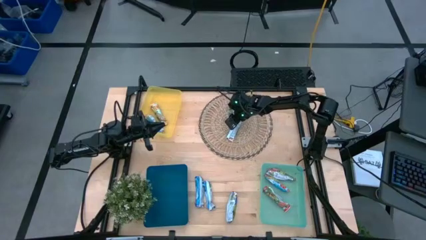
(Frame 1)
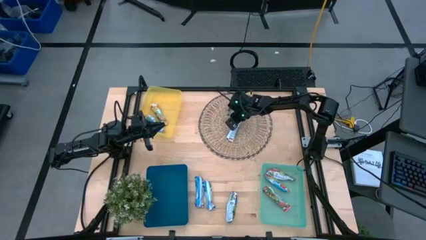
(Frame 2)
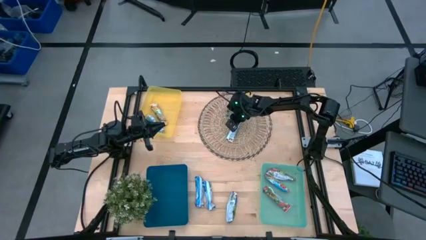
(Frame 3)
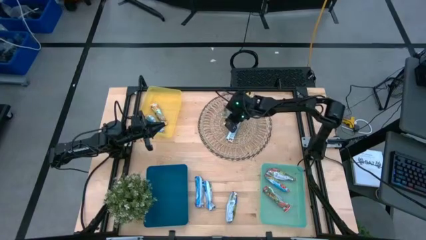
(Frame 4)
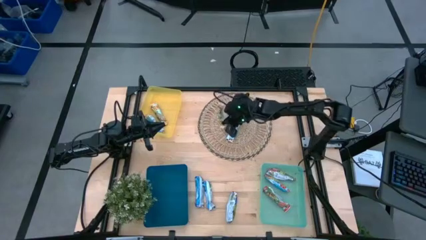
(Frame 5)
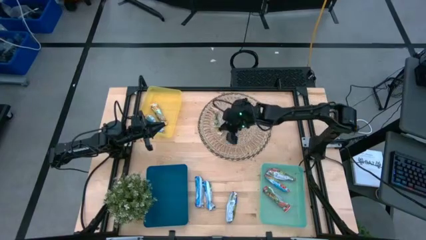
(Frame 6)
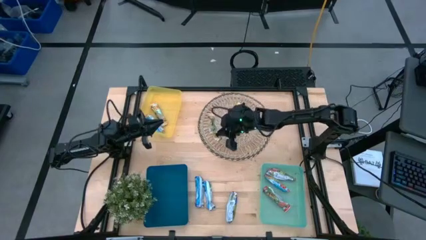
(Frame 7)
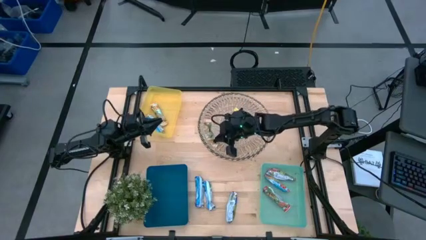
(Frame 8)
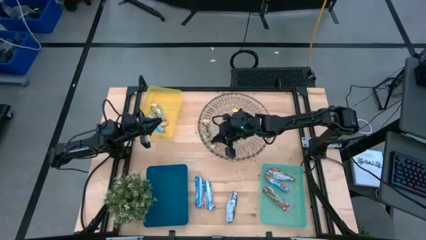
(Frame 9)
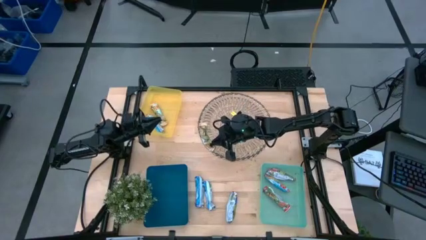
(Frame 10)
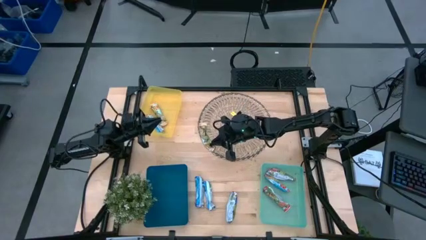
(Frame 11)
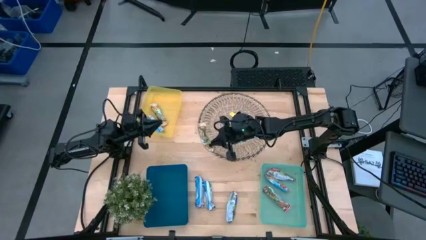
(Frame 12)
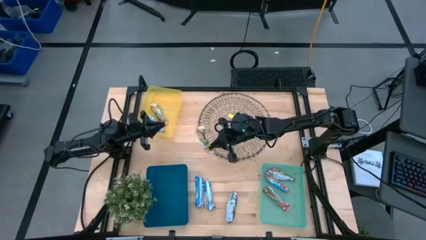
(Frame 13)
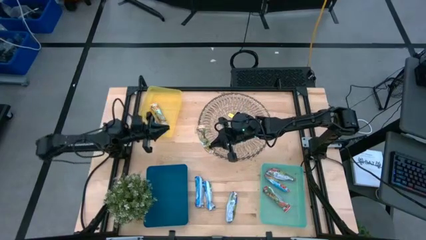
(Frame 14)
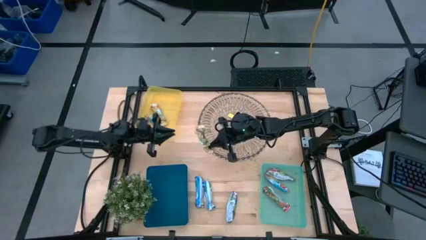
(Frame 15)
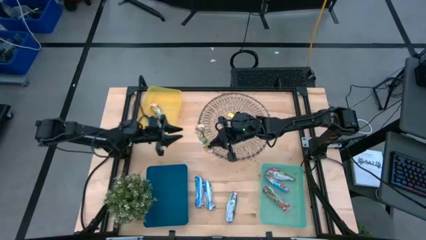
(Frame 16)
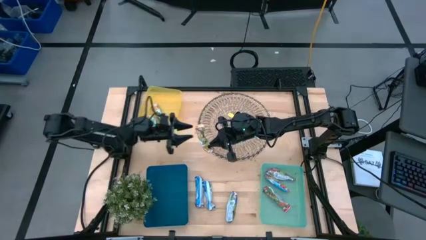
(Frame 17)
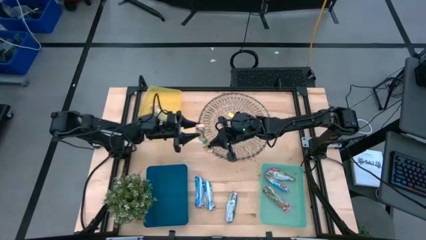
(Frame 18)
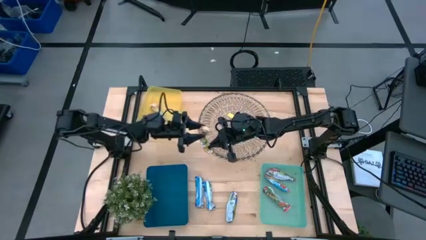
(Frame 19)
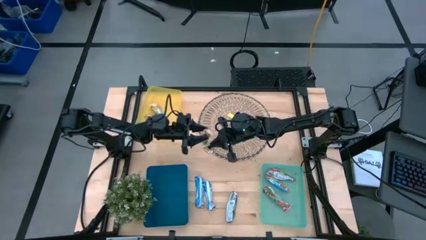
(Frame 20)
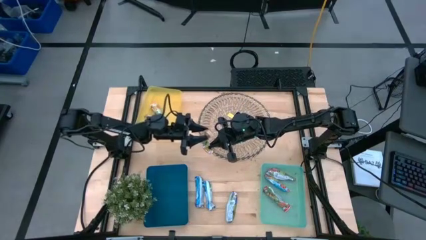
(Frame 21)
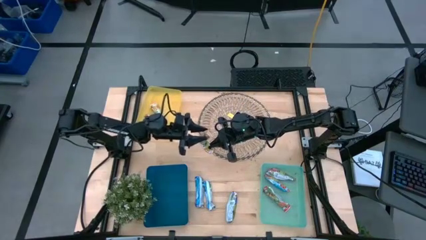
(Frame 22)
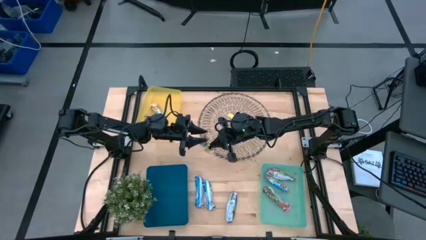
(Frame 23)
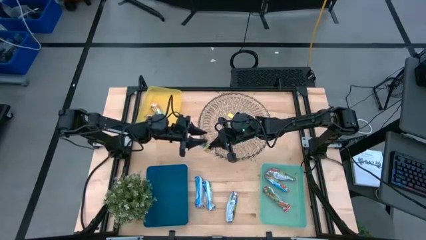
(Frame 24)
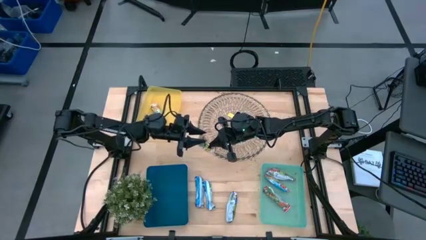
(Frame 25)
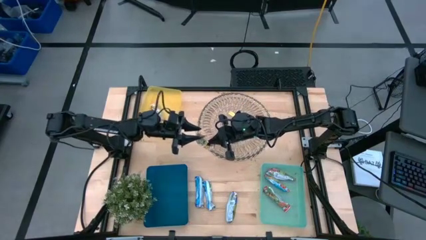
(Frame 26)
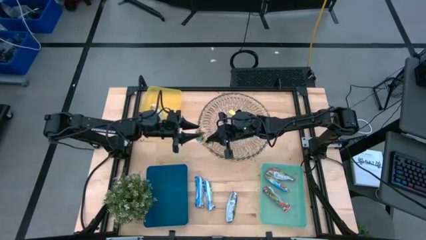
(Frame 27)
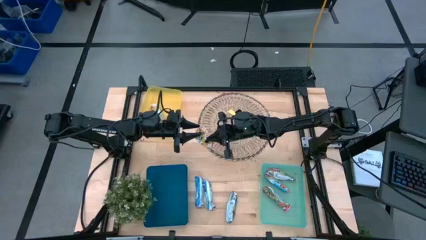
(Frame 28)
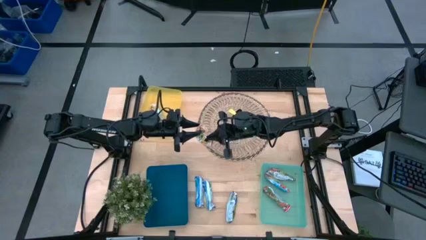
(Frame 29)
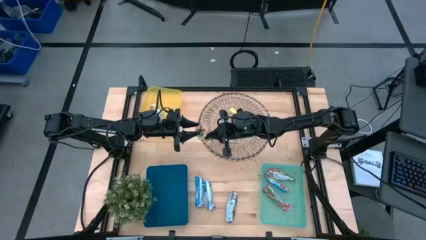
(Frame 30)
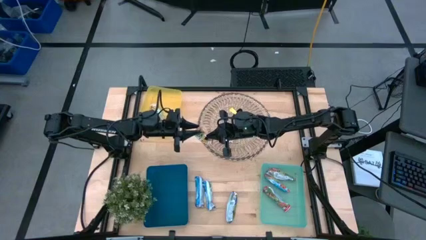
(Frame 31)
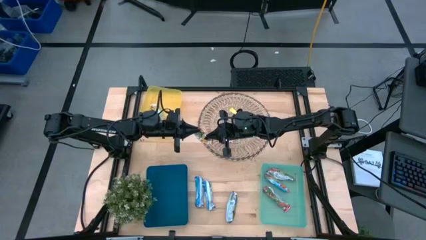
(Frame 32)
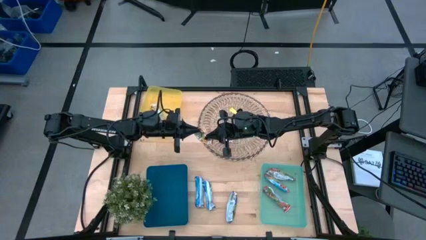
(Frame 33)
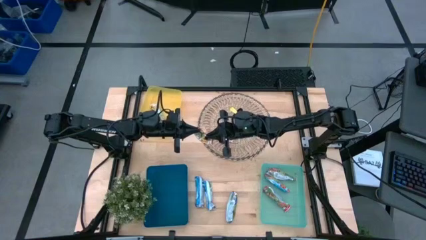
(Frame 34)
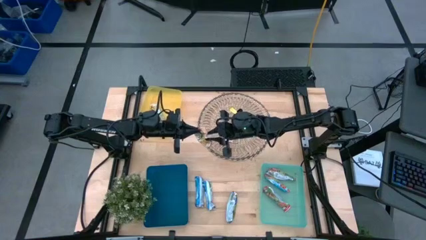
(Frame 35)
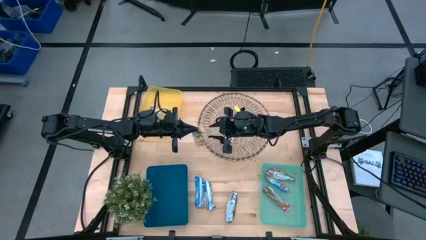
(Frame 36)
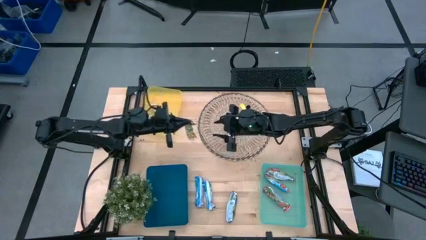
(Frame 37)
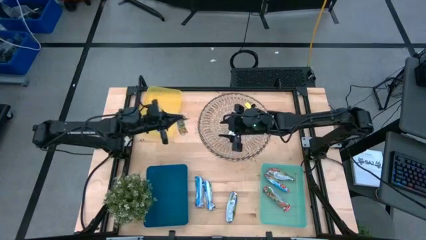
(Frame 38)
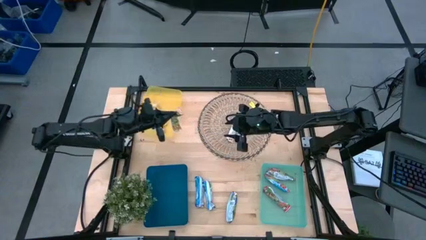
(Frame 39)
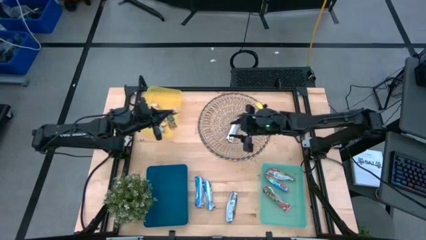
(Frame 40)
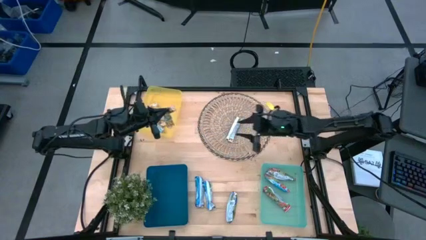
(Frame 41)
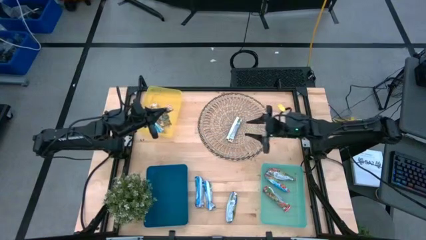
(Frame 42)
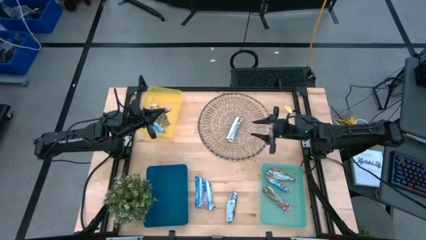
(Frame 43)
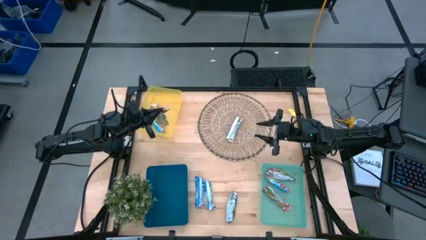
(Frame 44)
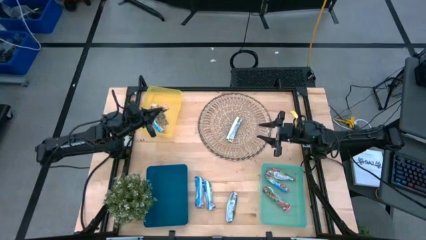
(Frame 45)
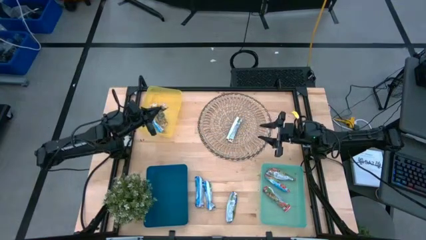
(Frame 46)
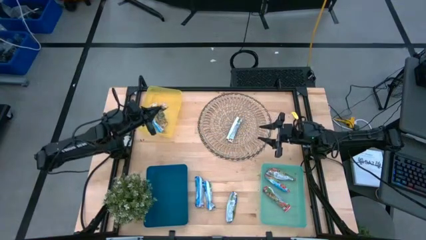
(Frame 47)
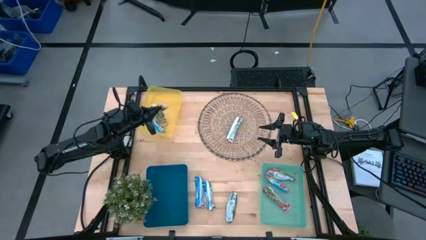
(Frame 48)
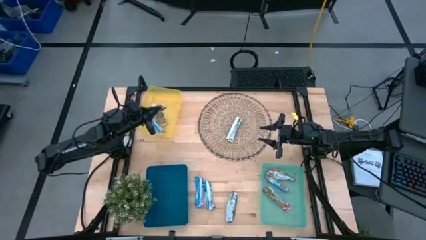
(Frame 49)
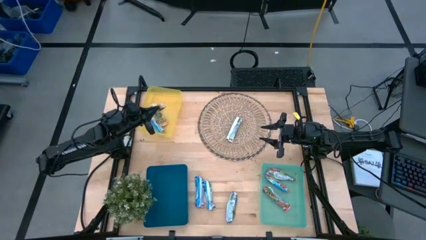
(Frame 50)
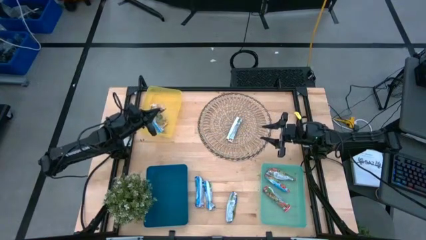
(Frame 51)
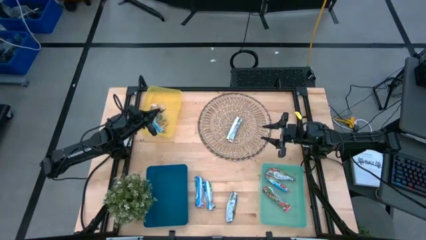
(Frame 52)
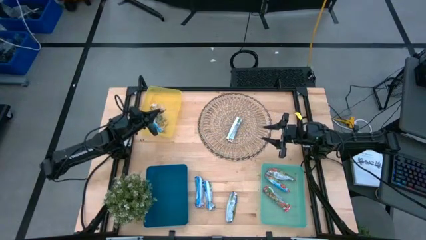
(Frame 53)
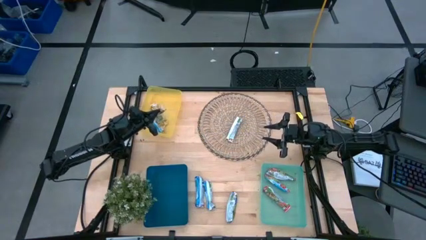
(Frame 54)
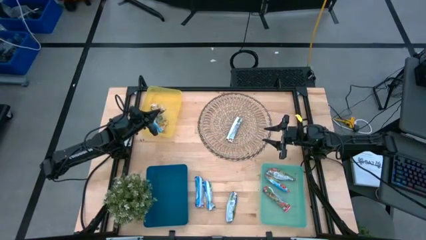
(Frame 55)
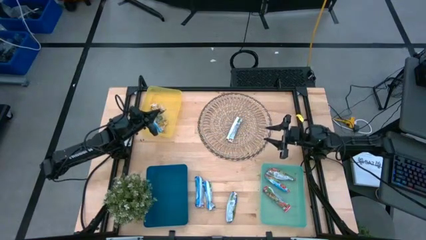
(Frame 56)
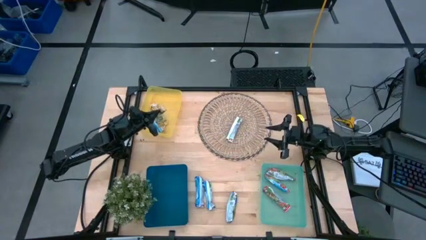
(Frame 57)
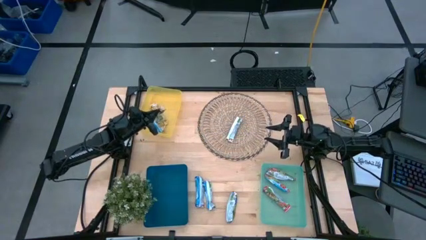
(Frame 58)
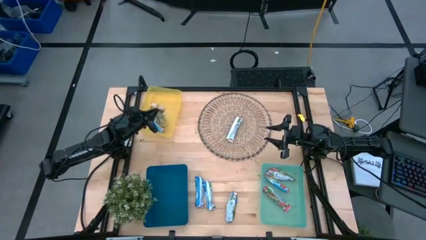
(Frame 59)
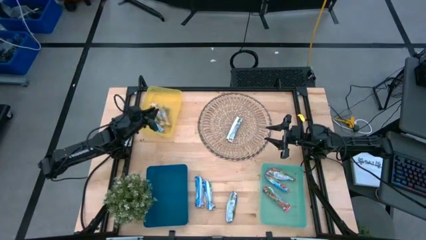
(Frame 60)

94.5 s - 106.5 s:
Task: Pick and place Granola Bars by type
Put the yellow granola bar into the yellow bin

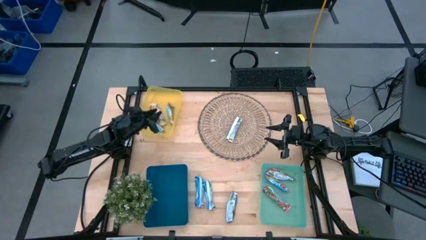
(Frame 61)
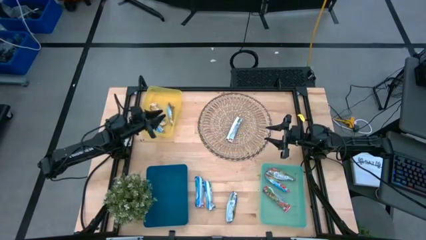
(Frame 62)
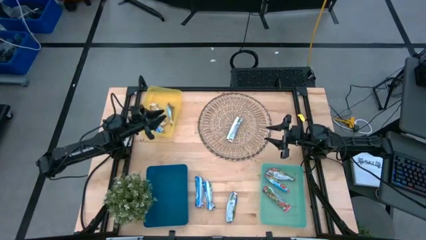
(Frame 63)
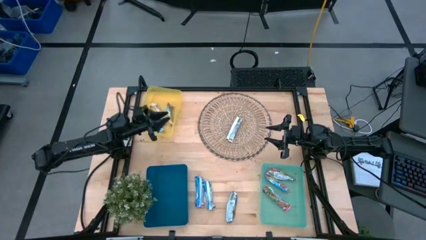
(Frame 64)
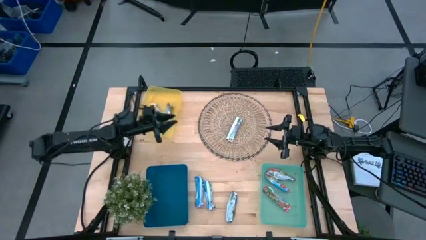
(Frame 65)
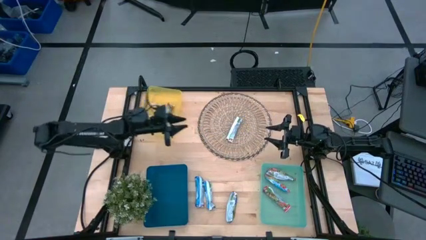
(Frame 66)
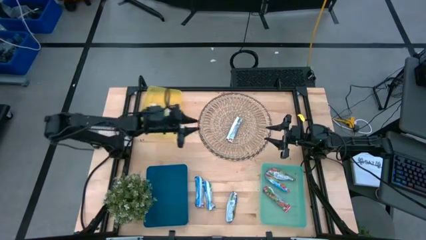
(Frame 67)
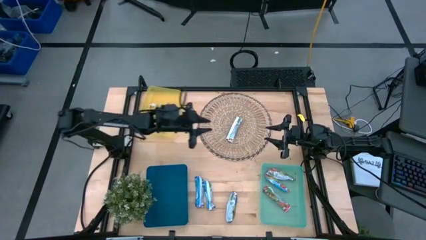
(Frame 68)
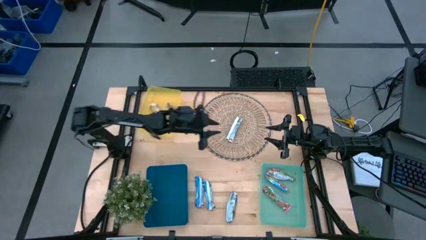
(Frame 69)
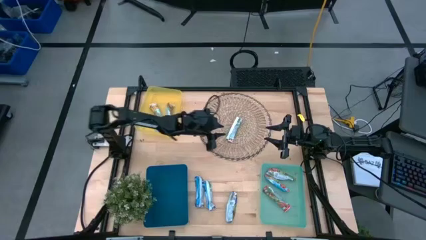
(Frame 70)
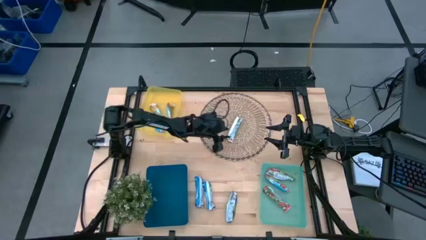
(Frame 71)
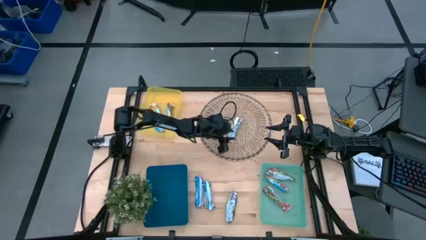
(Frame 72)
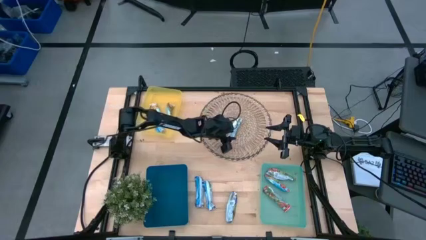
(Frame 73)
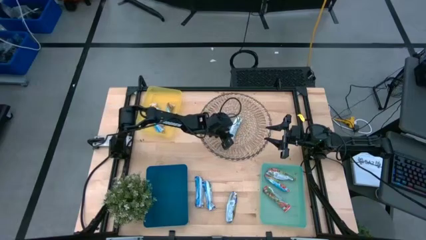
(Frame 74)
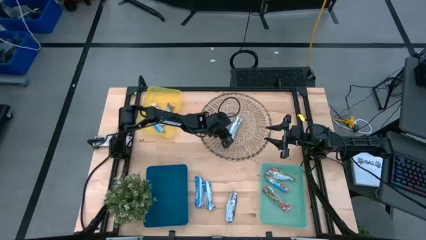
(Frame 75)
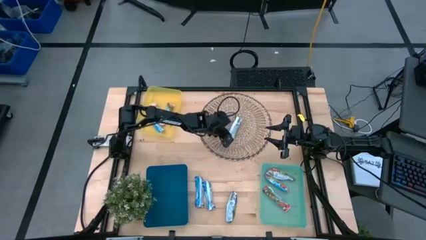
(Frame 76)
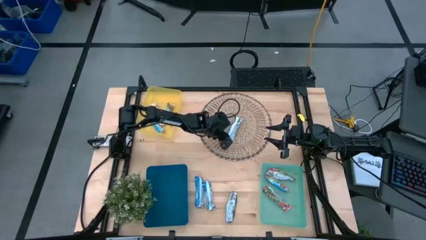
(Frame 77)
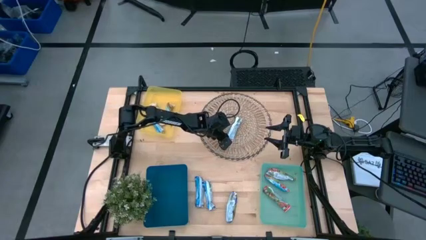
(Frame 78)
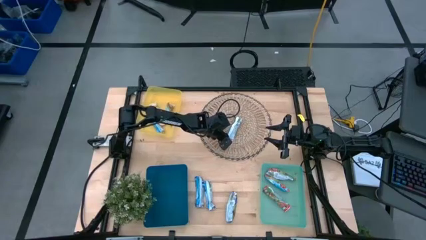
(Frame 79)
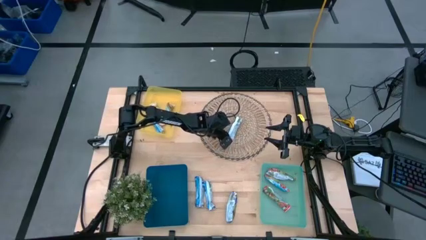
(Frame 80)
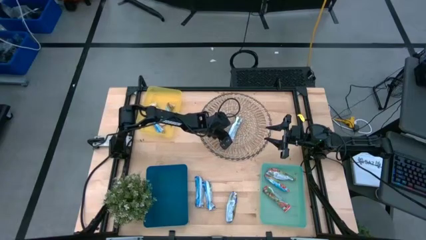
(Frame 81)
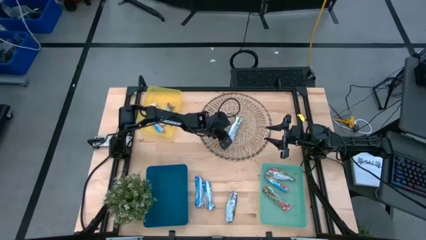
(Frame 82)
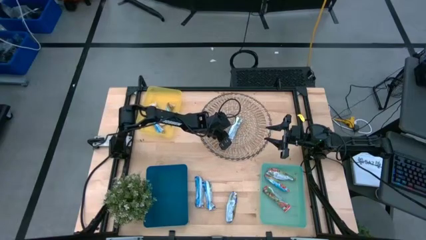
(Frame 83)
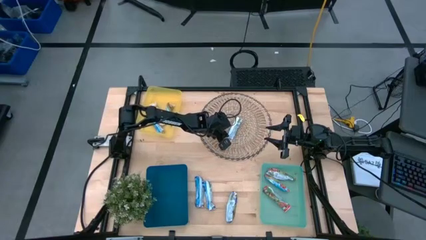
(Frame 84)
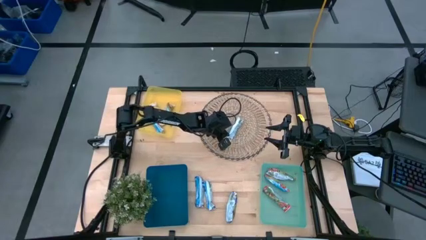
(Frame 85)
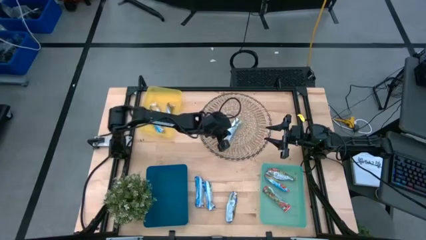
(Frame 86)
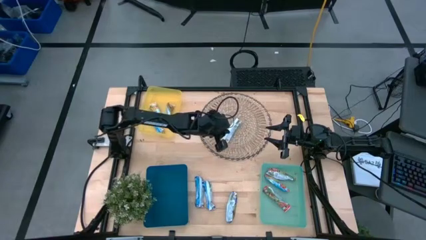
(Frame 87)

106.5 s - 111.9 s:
Put the yellow granola bar into the yellow bin
